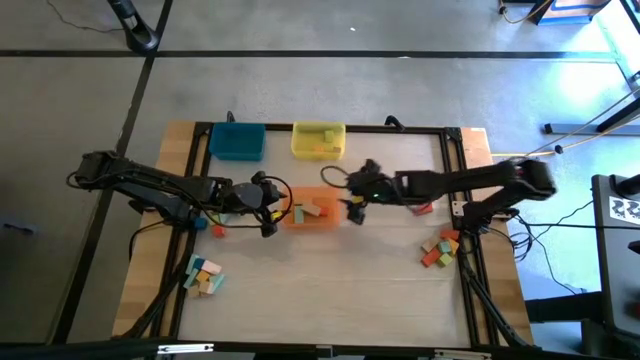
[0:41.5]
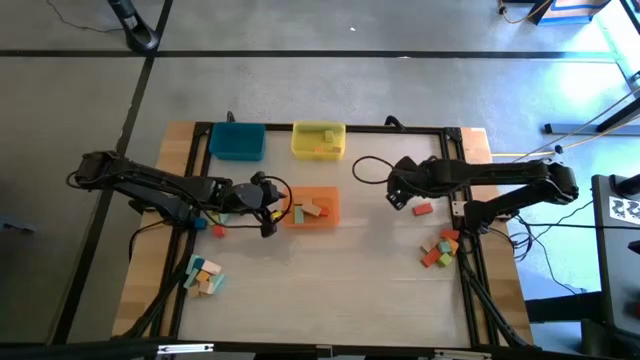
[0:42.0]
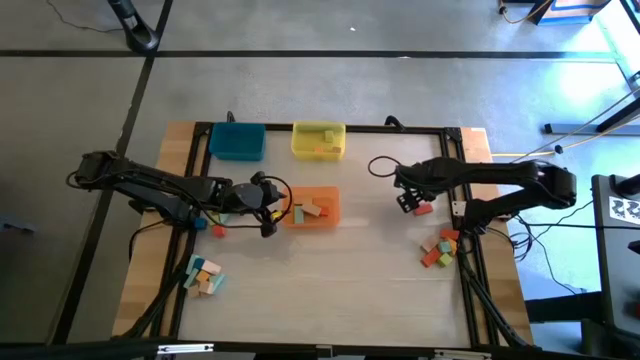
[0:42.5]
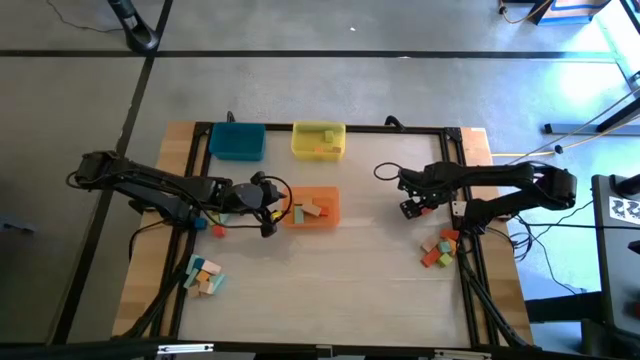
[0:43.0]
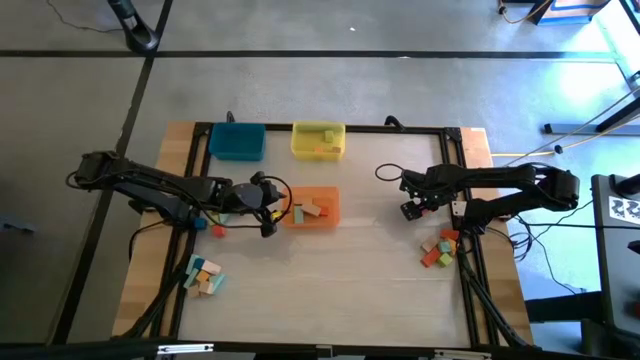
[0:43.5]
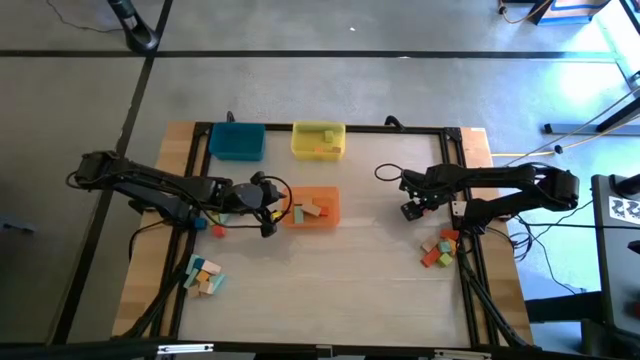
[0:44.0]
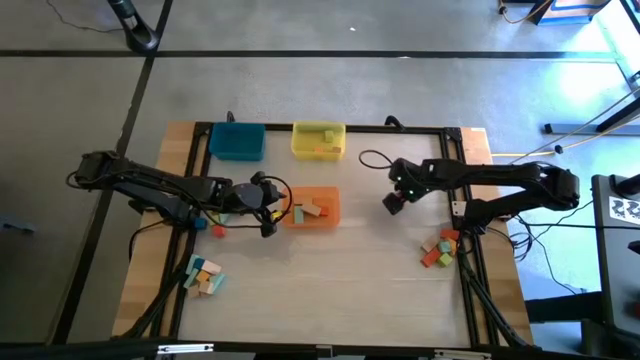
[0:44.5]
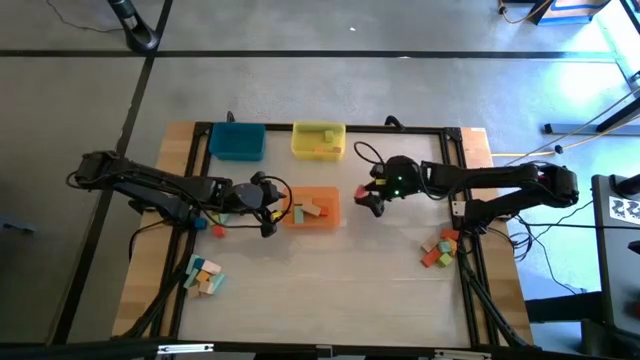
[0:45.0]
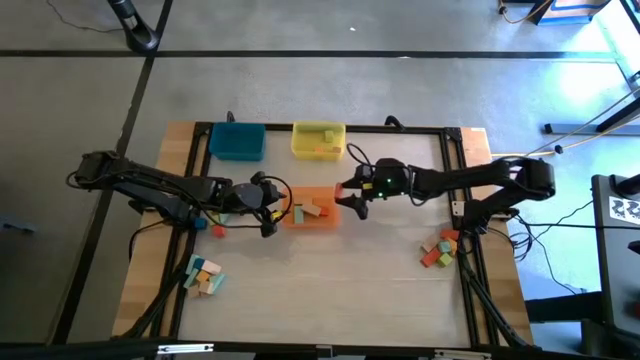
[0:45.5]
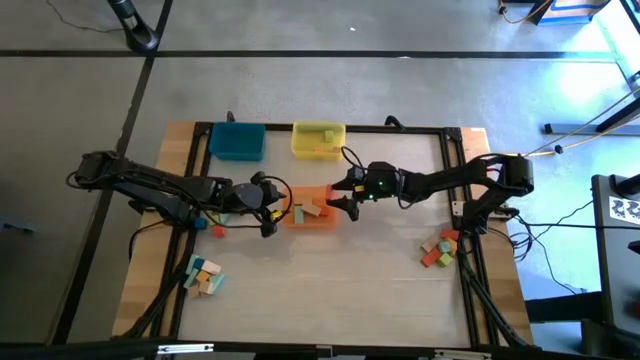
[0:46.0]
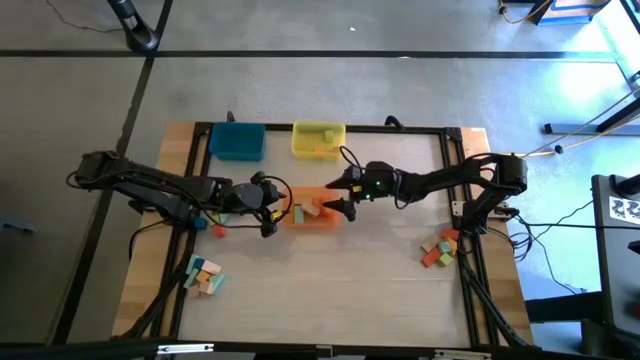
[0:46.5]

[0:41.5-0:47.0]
Task: Sort blocks by size
Put the orange rectangle block into the orange bin

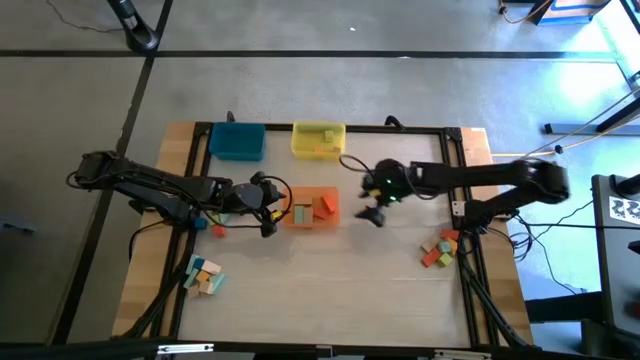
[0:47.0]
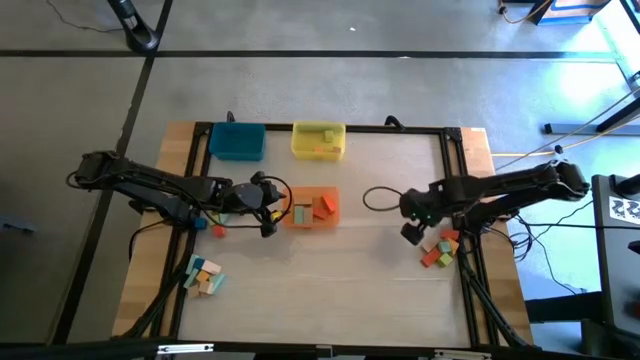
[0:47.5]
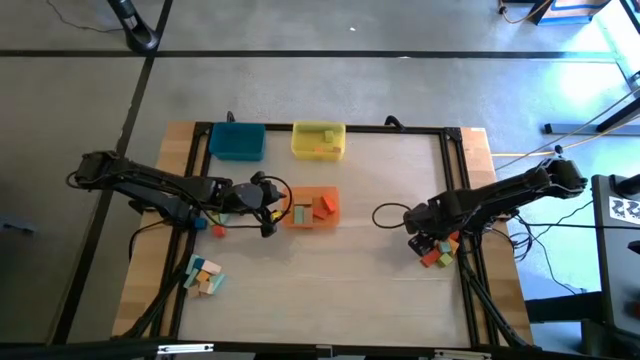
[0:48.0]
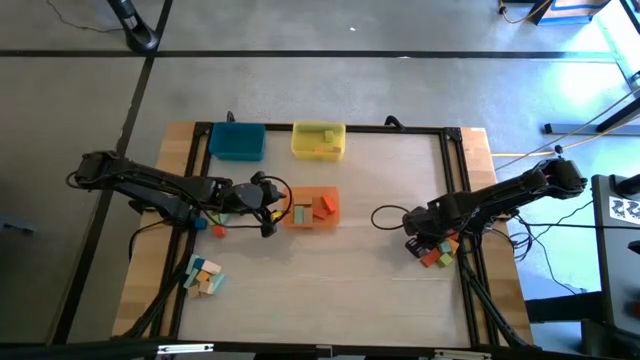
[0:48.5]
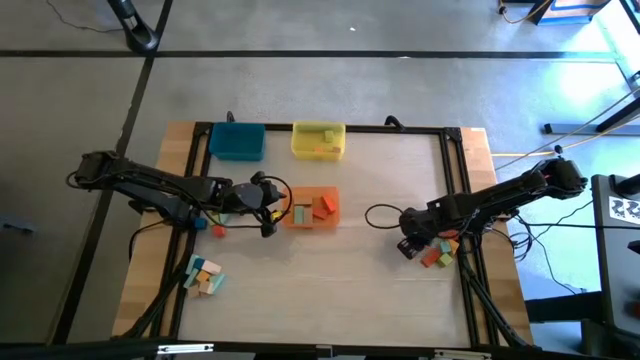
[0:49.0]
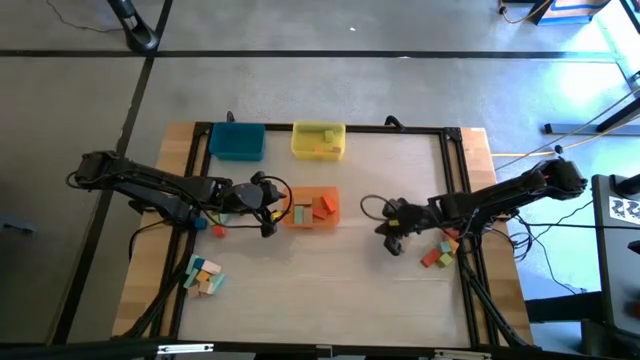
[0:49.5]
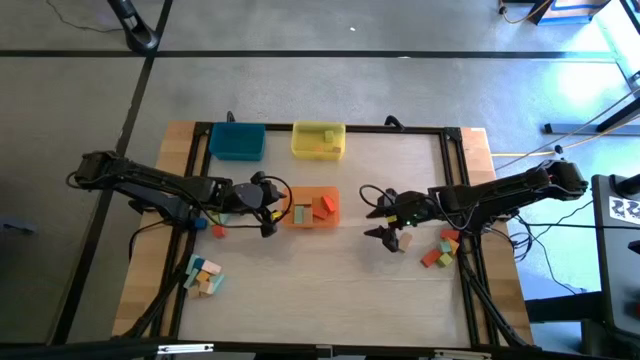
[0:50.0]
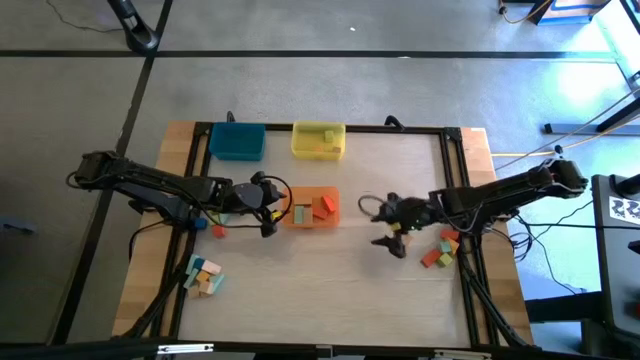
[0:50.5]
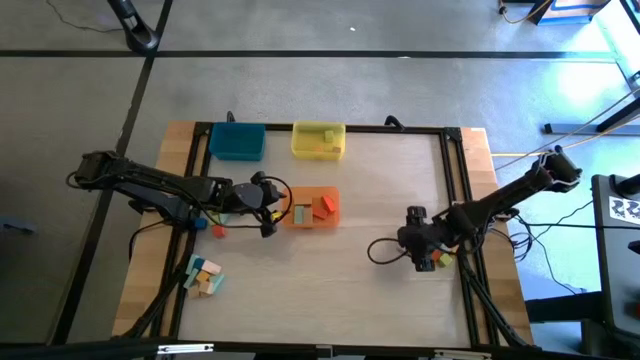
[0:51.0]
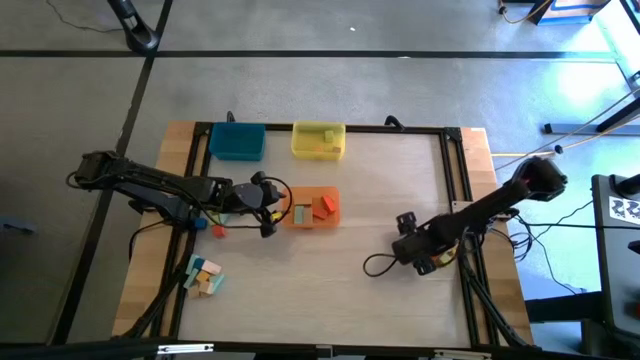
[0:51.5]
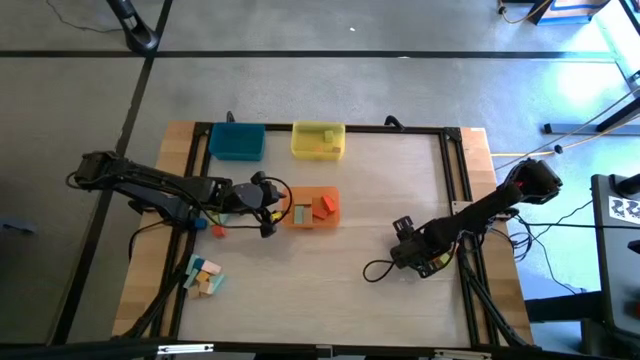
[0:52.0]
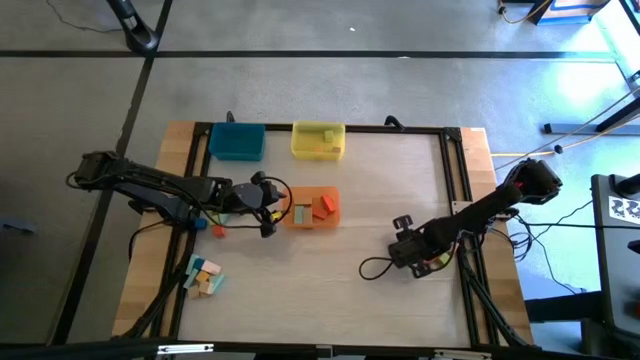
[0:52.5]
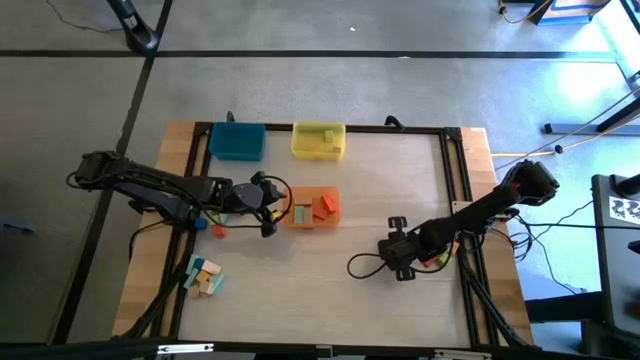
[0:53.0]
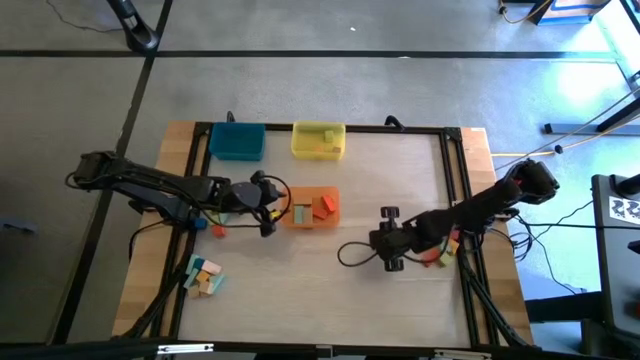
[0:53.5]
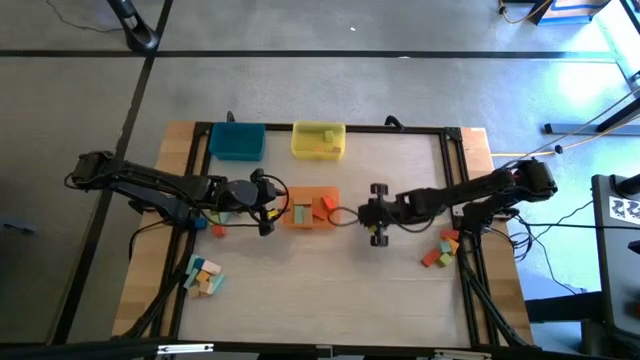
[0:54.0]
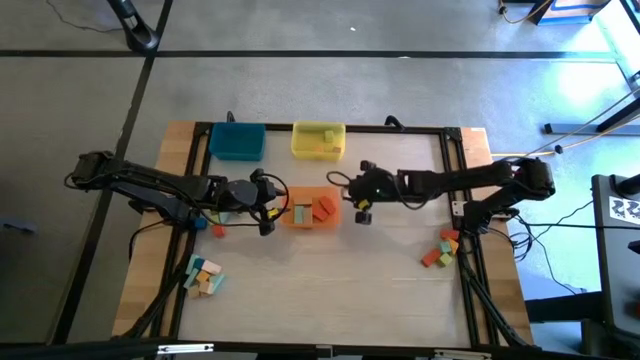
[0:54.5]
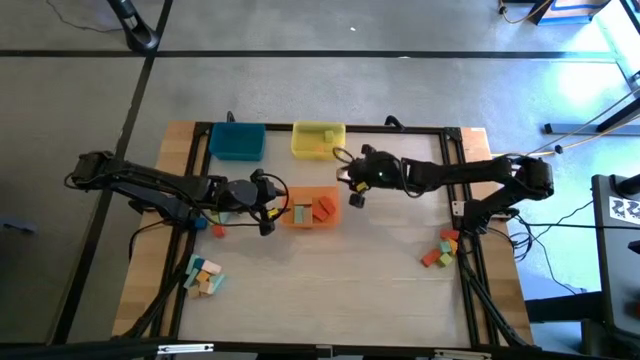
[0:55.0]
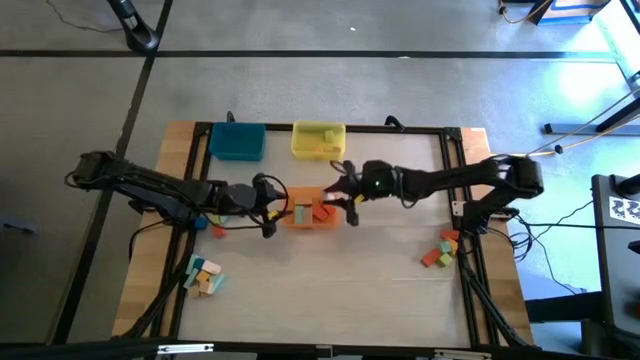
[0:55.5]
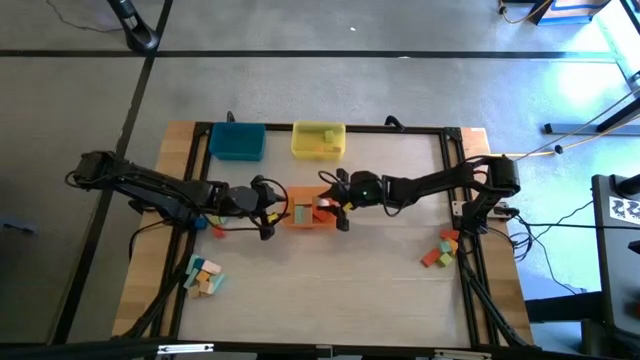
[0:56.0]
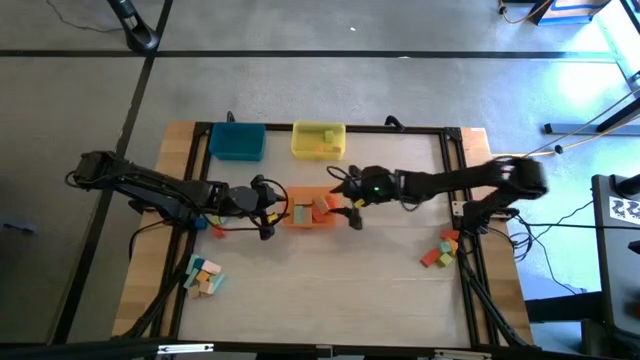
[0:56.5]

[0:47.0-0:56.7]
Put the brown rectangle block into the orange bin

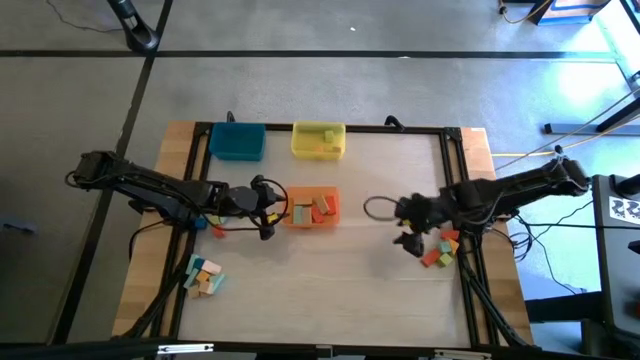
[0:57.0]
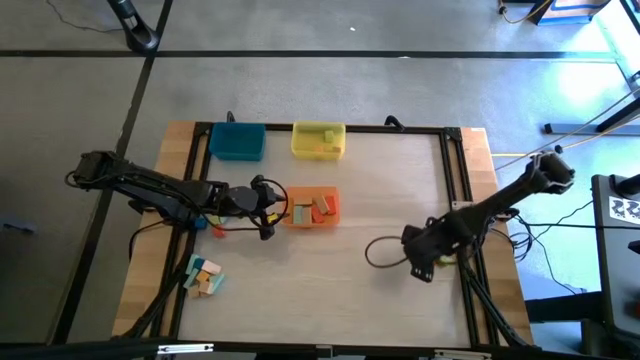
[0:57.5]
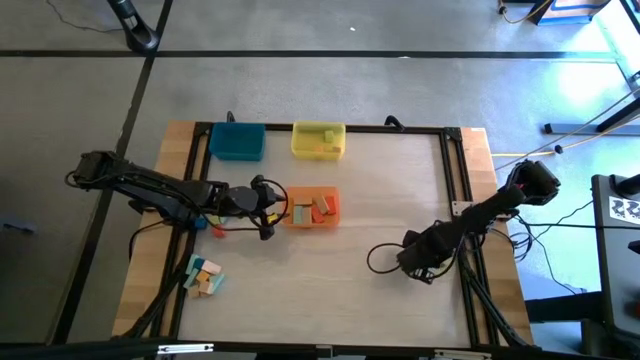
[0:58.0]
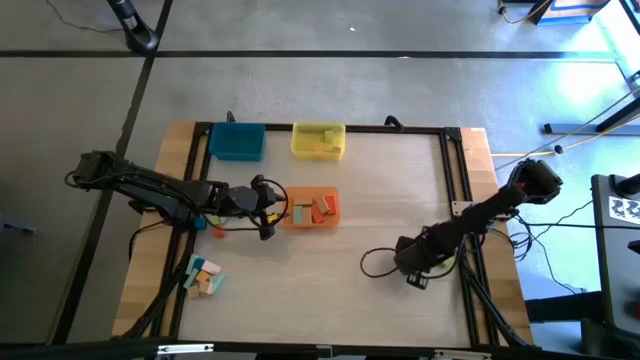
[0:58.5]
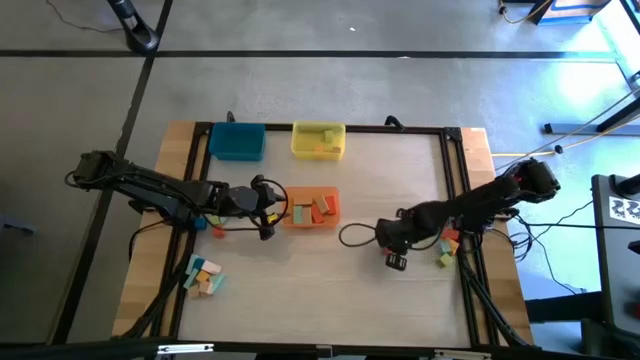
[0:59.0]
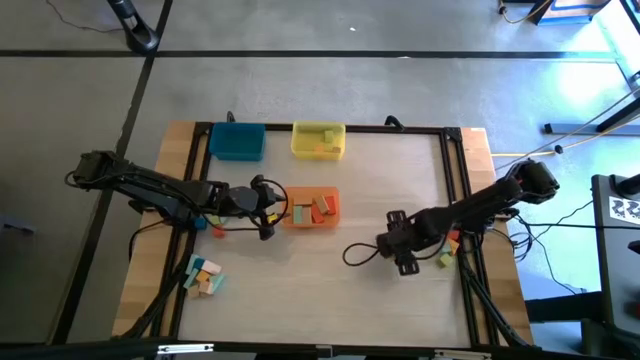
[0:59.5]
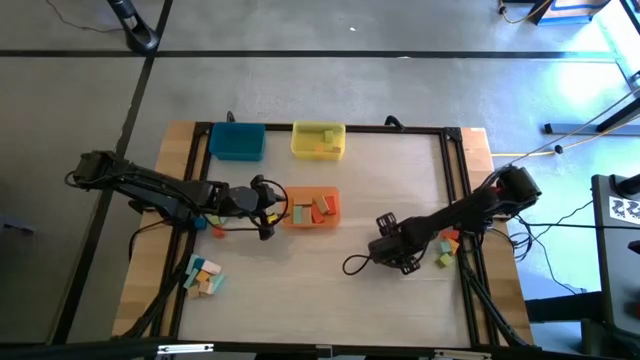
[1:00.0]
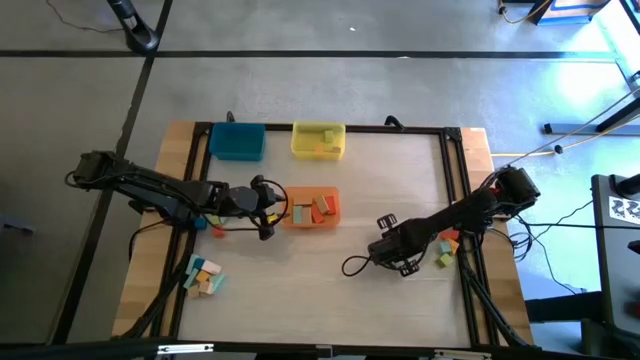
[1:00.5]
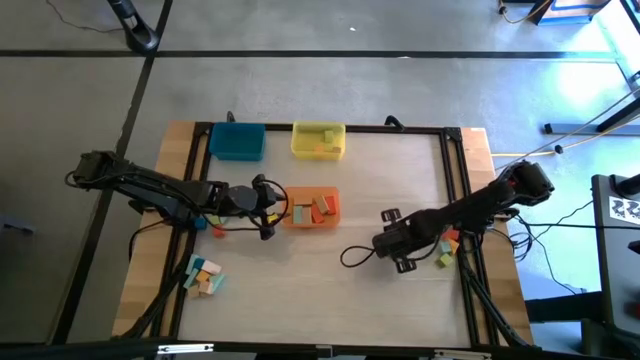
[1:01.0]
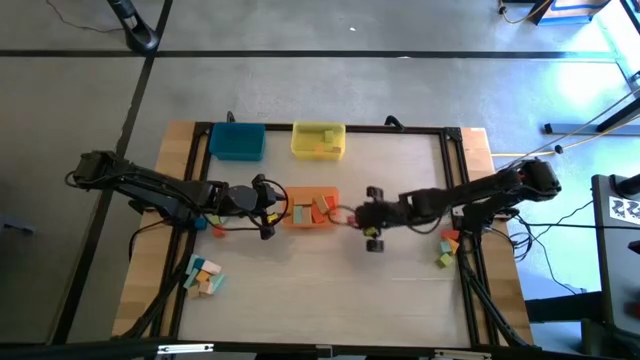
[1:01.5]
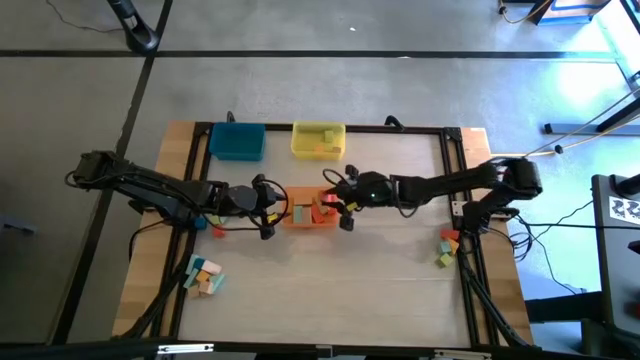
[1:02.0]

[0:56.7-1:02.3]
Put the orange rectangle block into the orange bin
